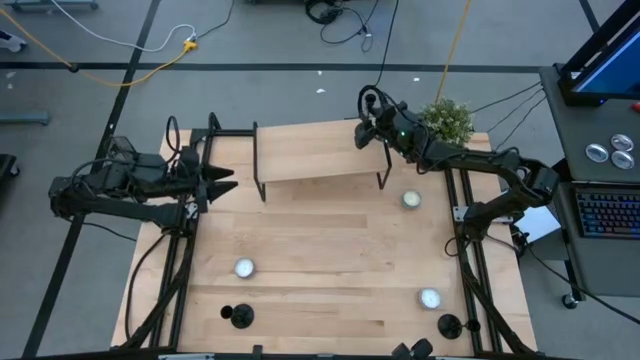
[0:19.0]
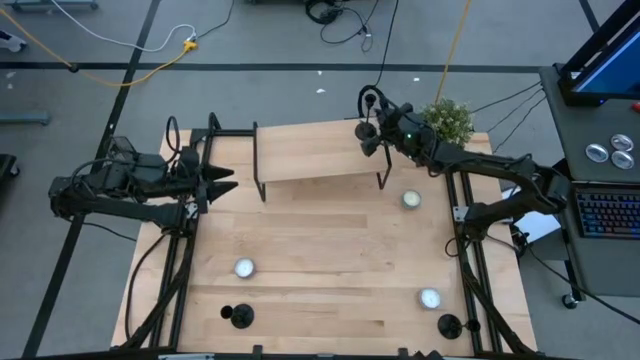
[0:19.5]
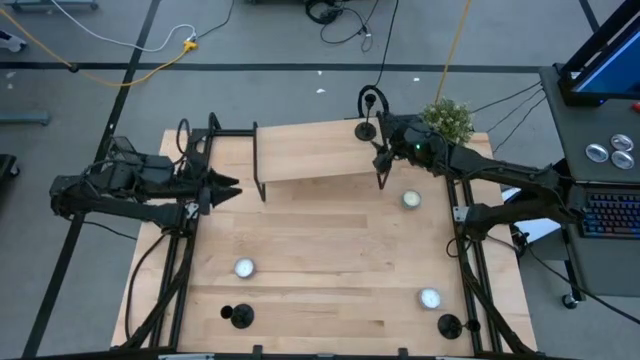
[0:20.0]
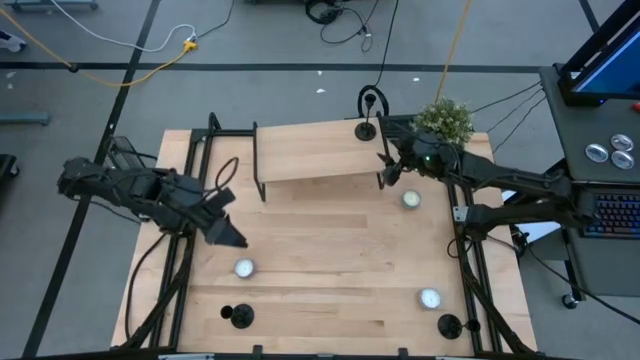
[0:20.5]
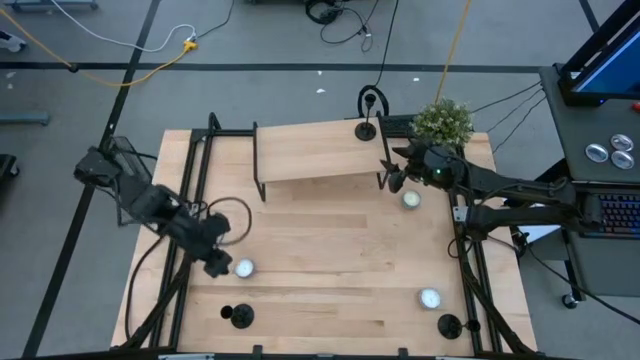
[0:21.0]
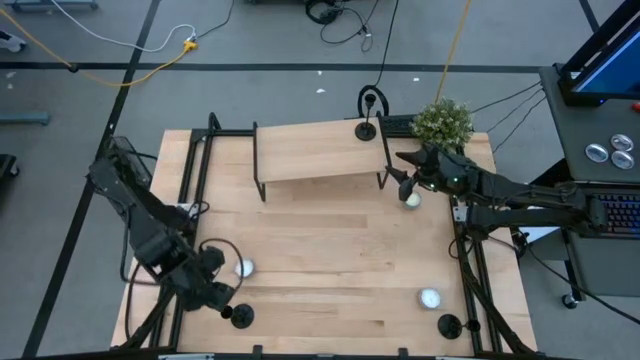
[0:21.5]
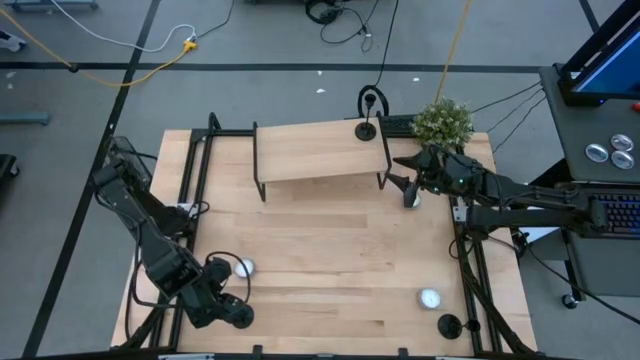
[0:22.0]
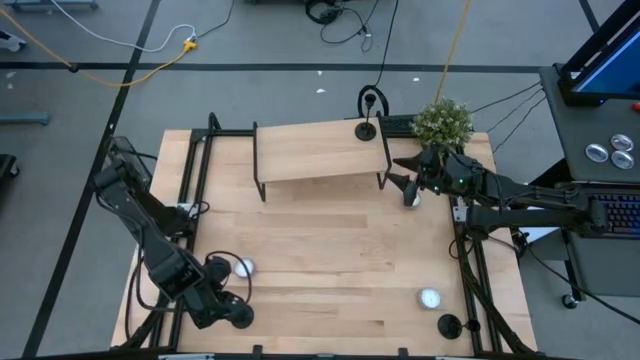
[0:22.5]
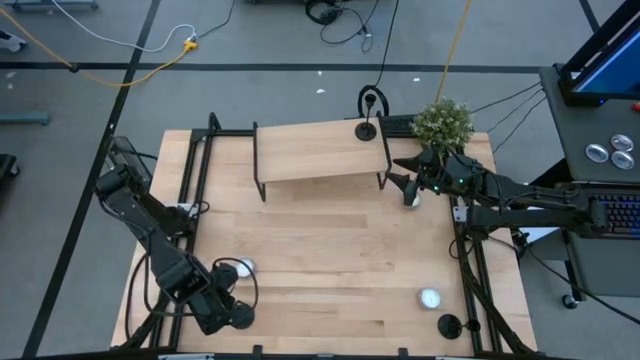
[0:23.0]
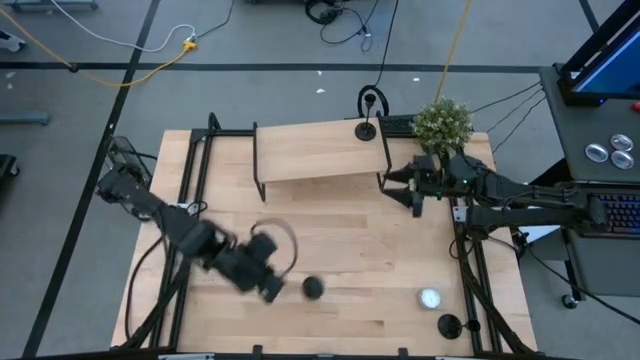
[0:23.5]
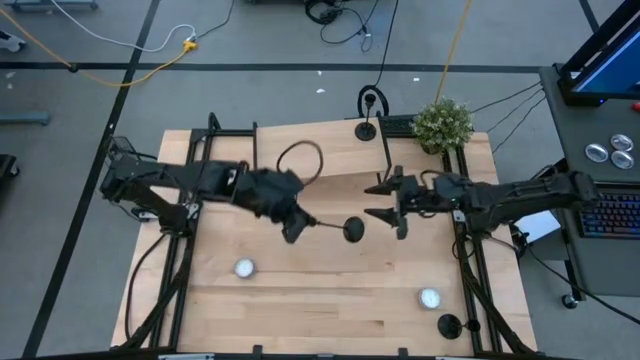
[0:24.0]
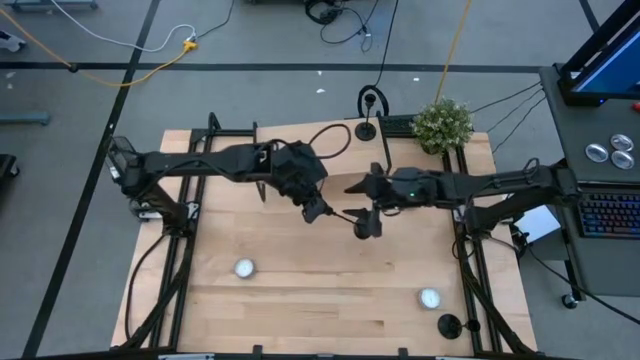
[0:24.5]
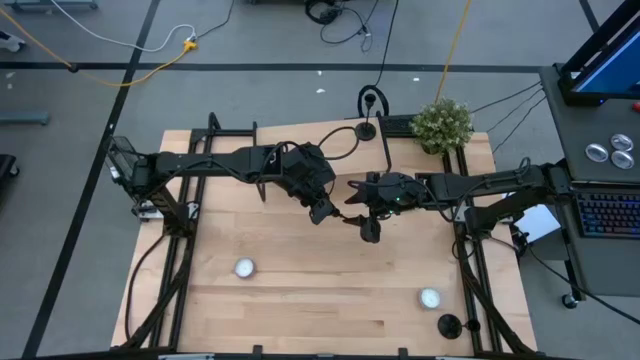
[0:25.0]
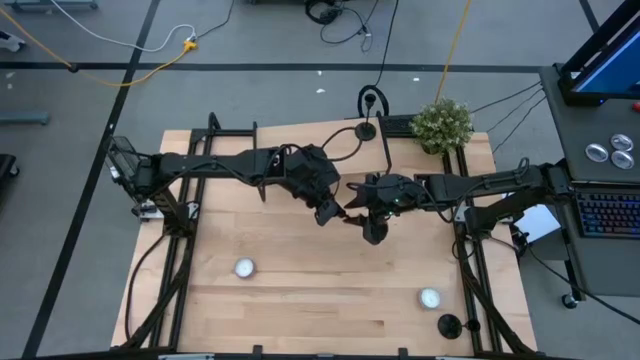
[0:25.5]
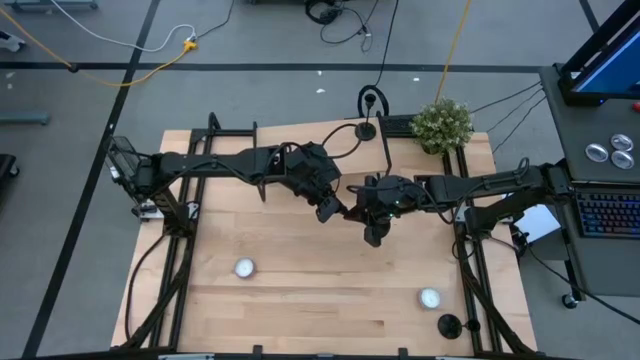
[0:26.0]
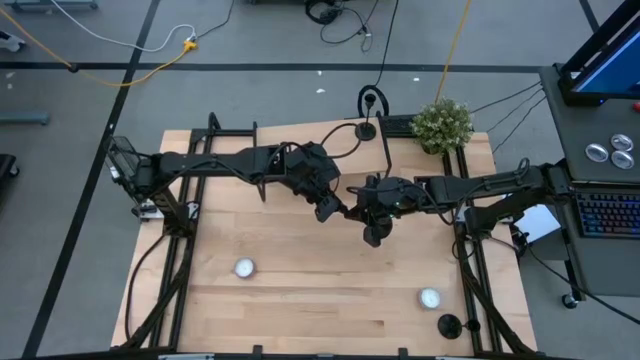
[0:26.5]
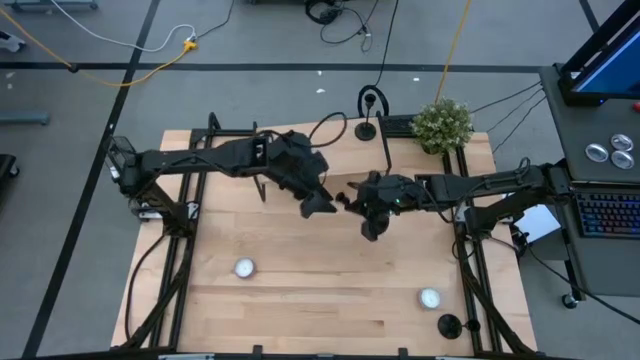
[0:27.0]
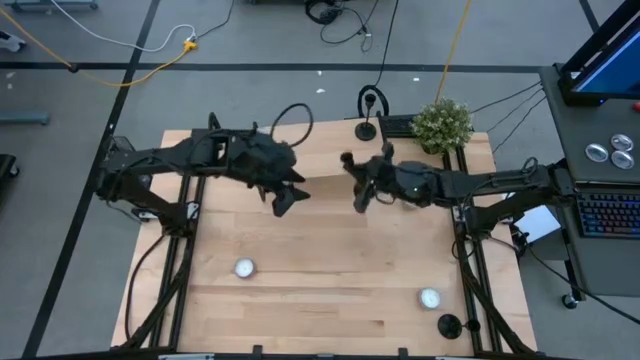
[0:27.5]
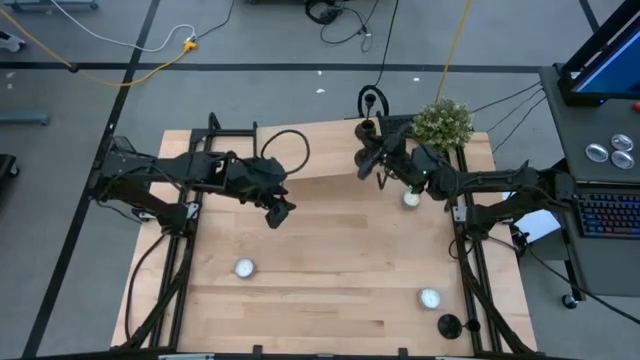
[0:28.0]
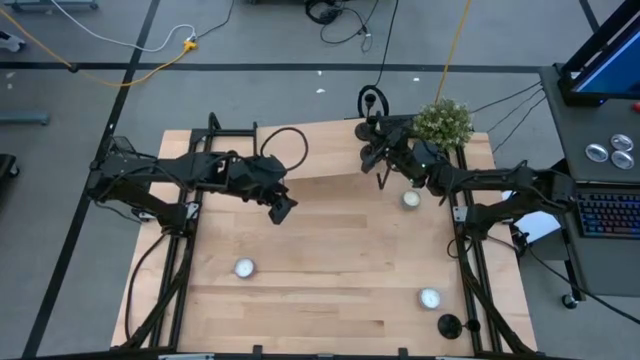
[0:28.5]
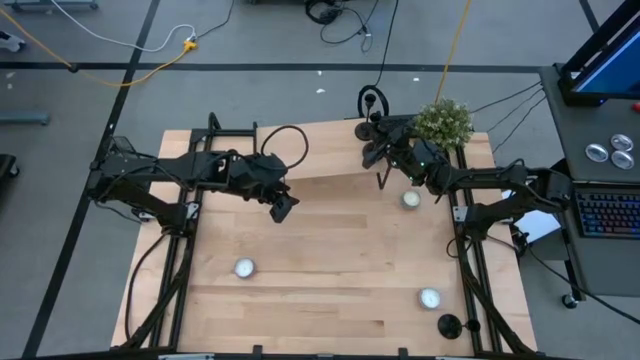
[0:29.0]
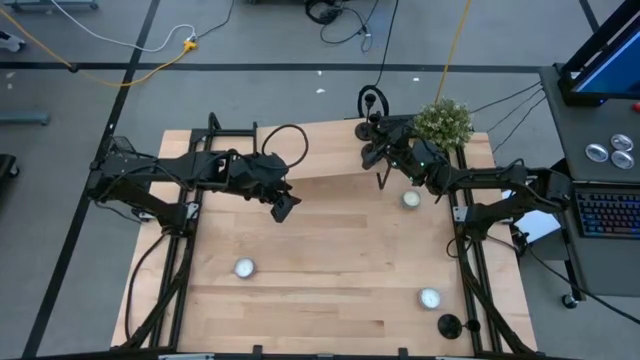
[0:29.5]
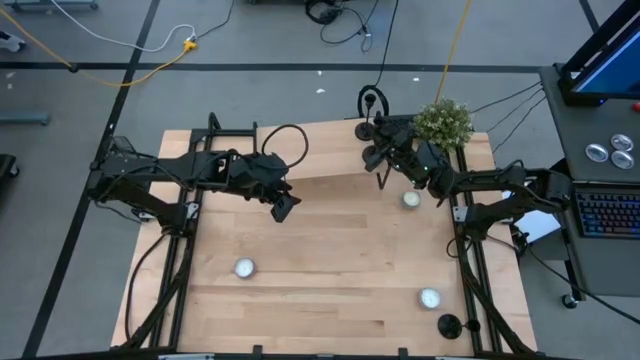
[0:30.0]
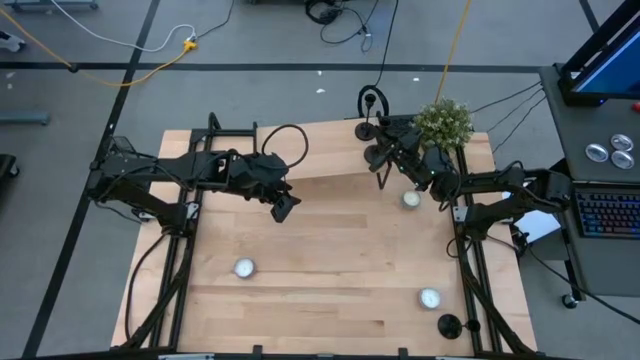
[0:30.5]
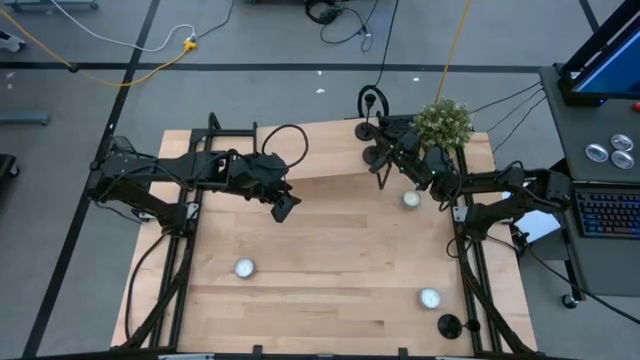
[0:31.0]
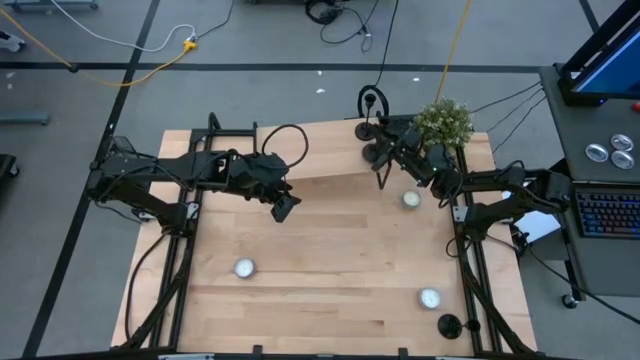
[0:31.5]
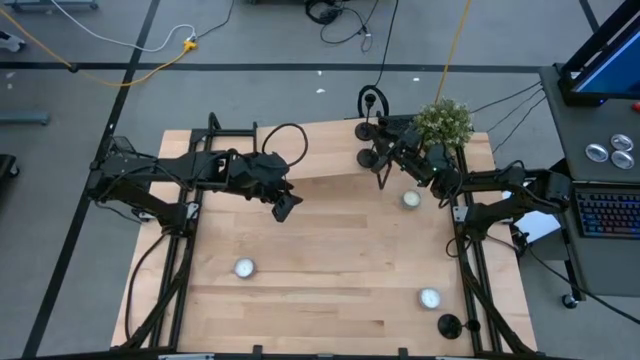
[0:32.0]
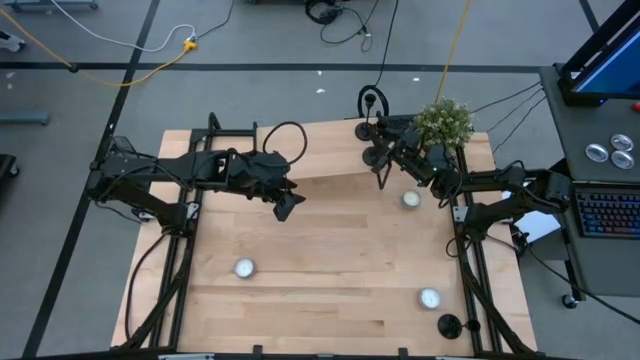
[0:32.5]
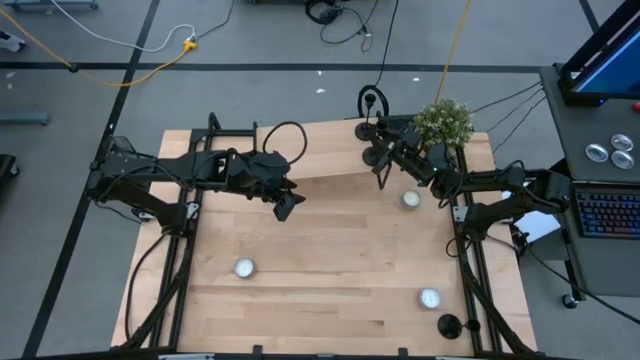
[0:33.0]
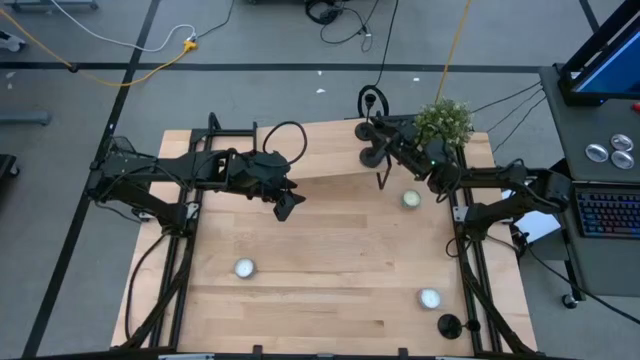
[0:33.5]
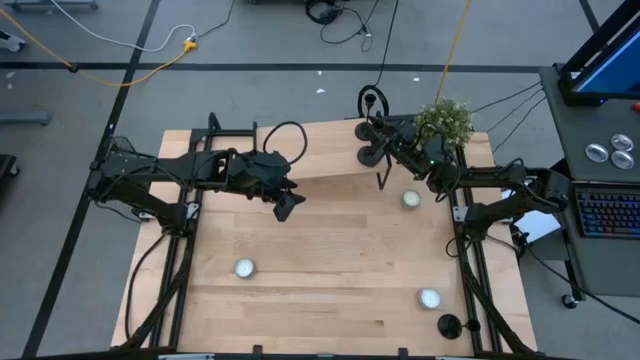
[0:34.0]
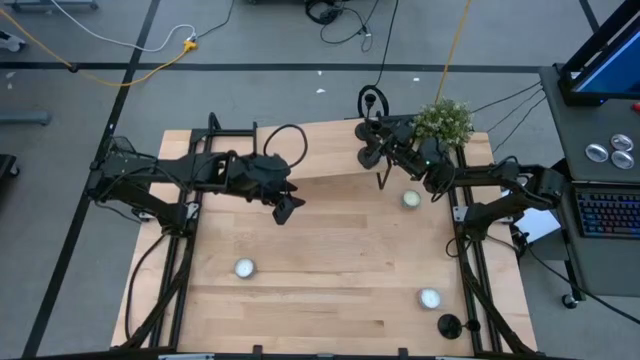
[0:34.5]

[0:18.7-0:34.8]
Task: Pick & Place candle stick holders
Put the left black candle holder on the shelf aligned with the other black candle holder

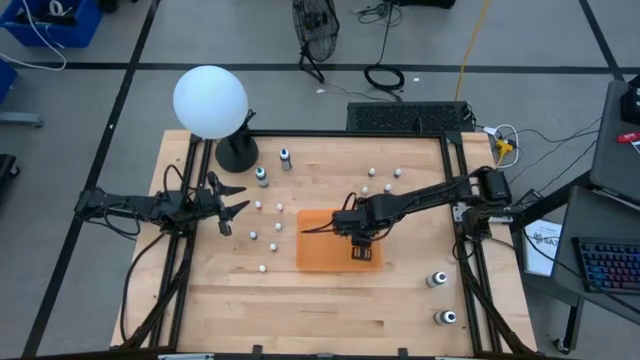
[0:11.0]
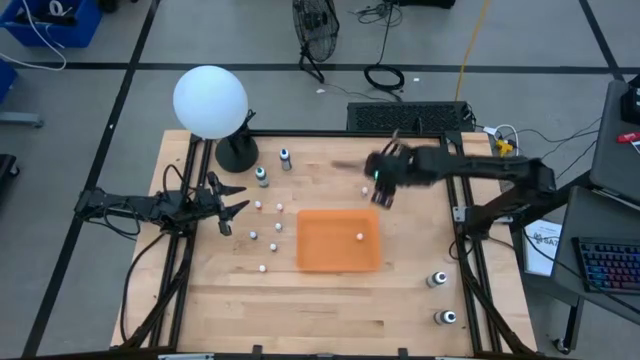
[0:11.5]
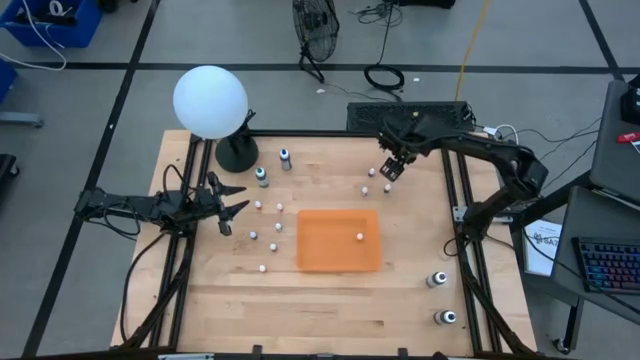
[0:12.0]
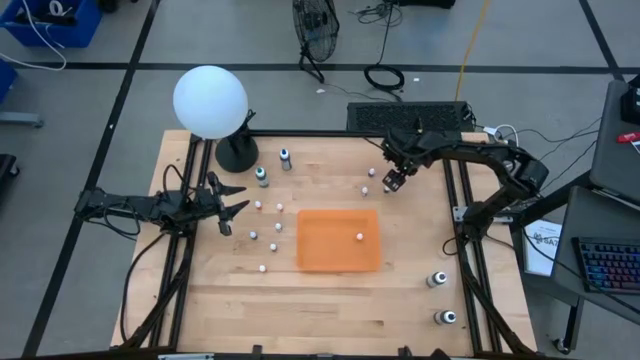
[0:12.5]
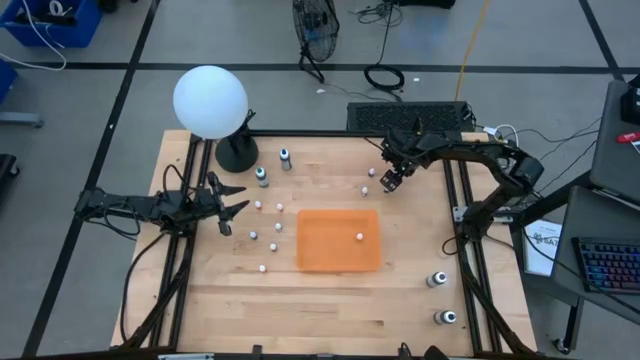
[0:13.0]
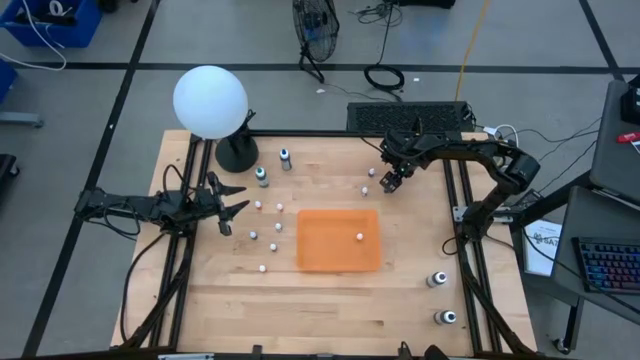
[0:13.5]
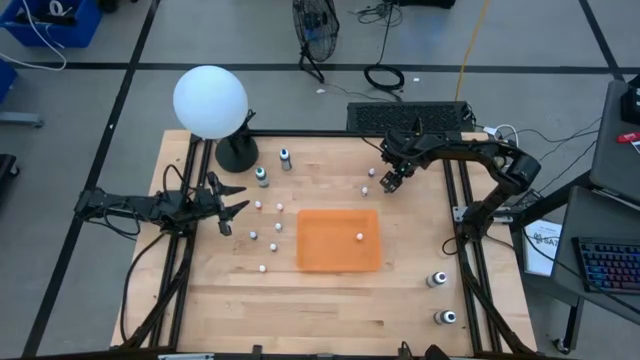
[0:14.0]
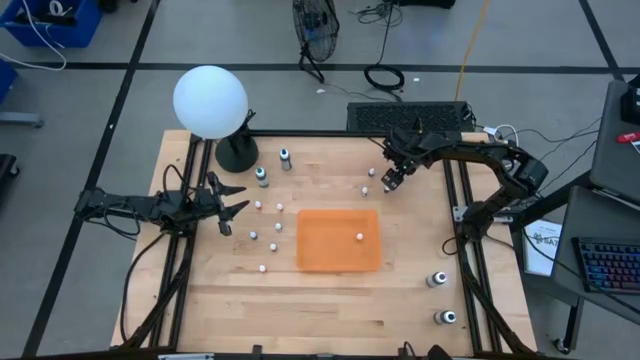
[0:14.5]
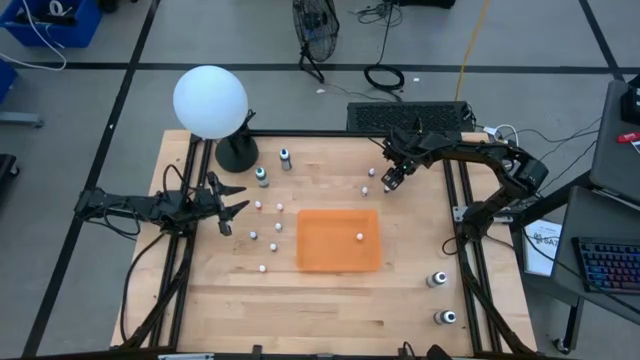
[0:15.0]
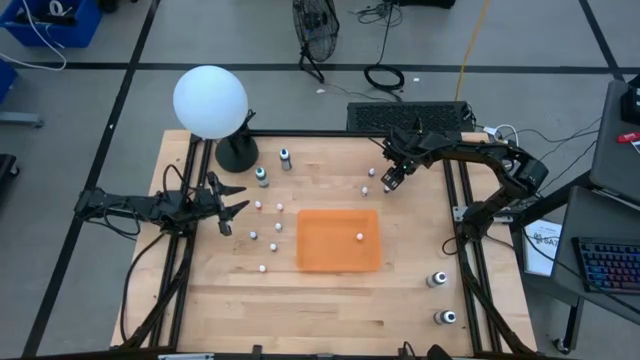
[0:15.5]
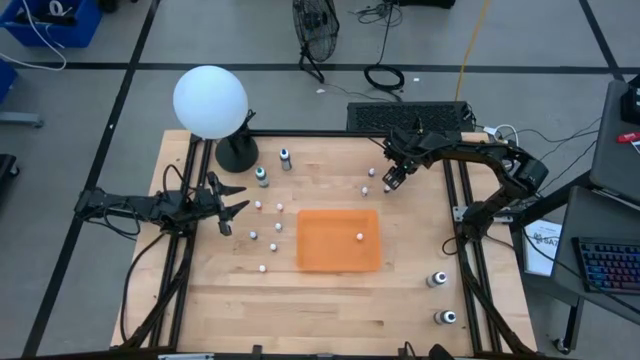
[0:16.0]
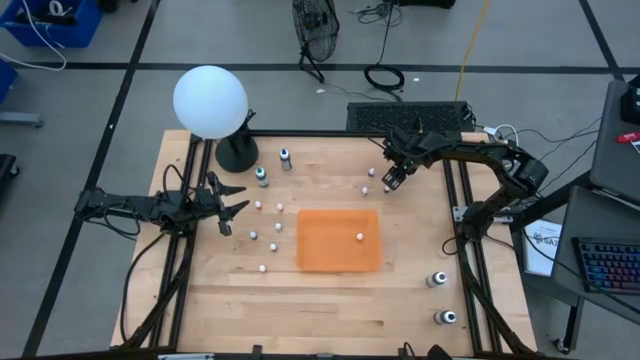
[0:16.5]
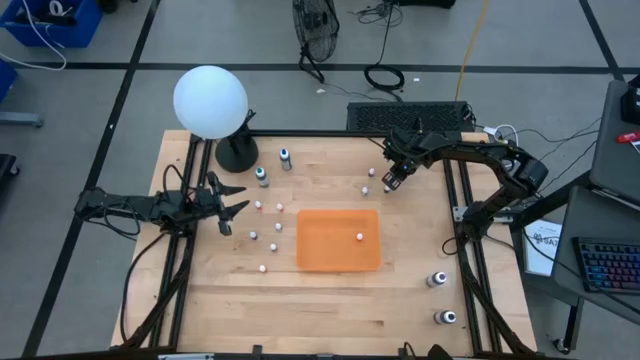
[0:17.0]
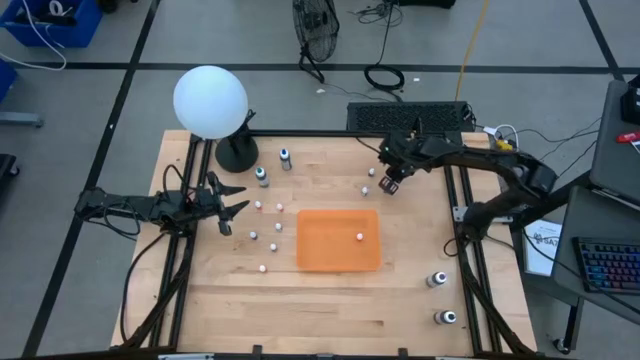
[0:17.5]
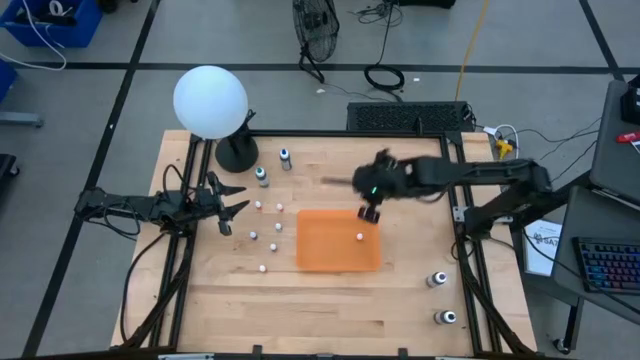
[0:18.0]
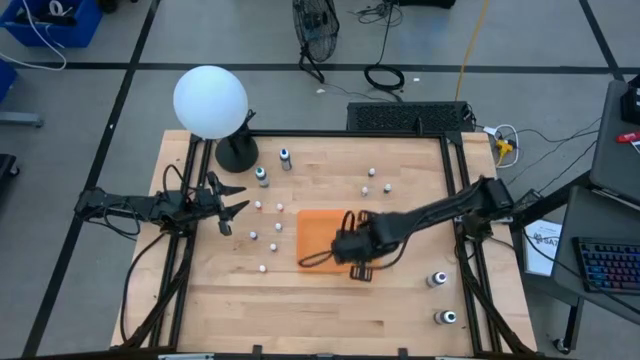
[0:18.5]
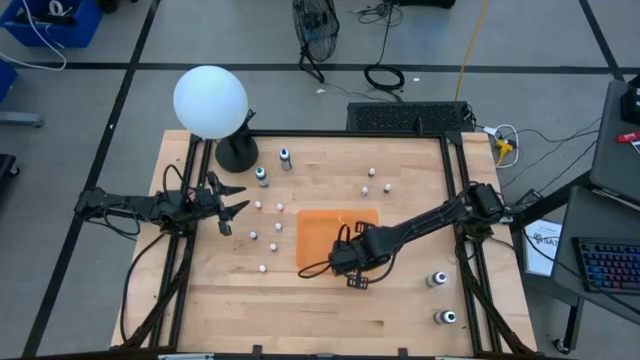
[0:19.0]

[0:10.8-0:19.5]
Task: Pick & Place food coloring
Put the small black food coloring bottle into the container
